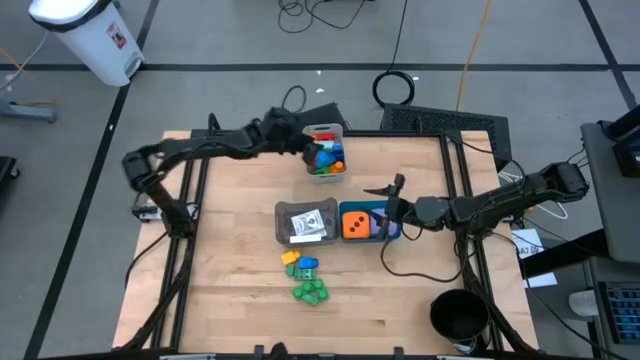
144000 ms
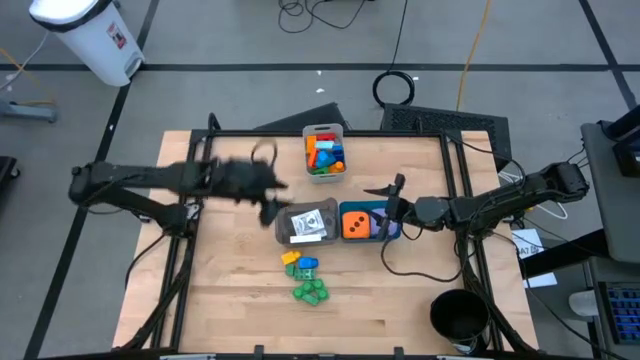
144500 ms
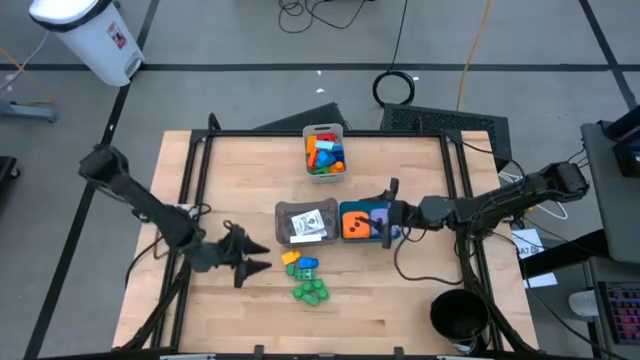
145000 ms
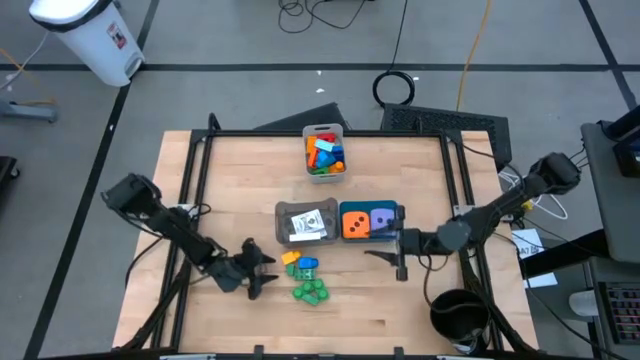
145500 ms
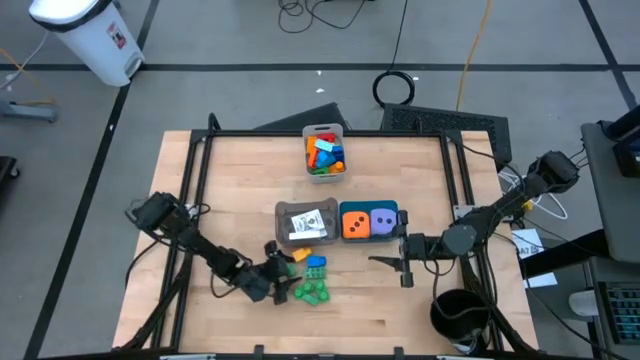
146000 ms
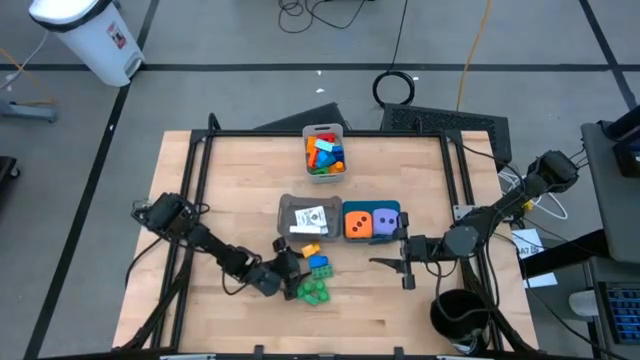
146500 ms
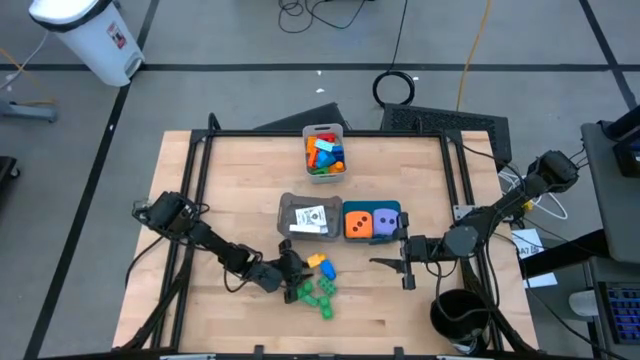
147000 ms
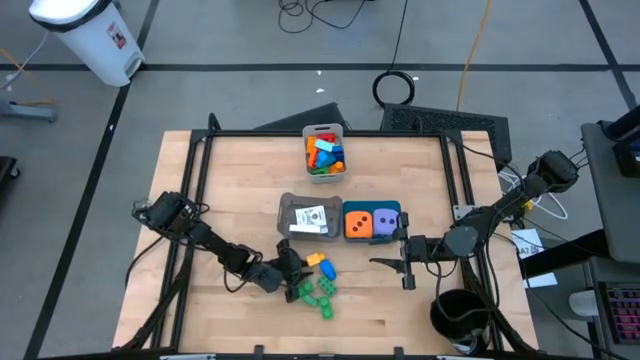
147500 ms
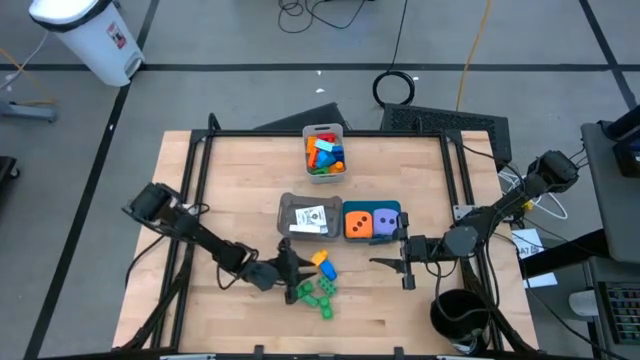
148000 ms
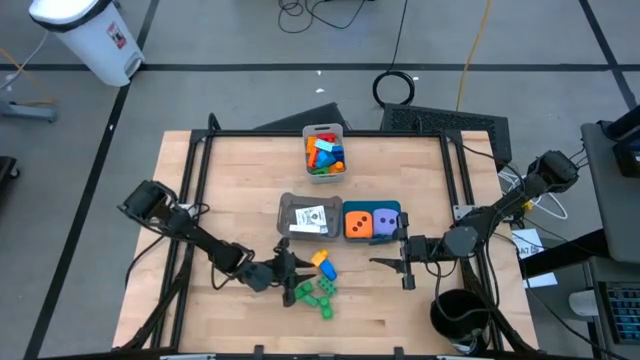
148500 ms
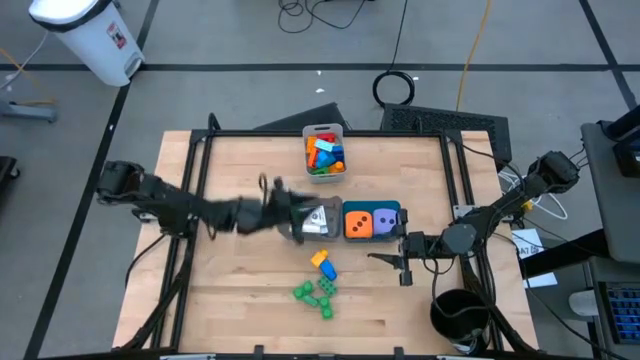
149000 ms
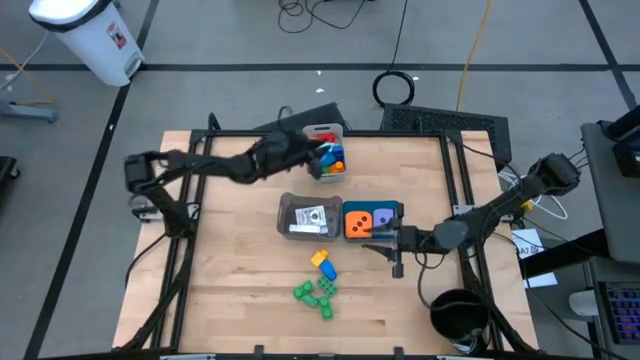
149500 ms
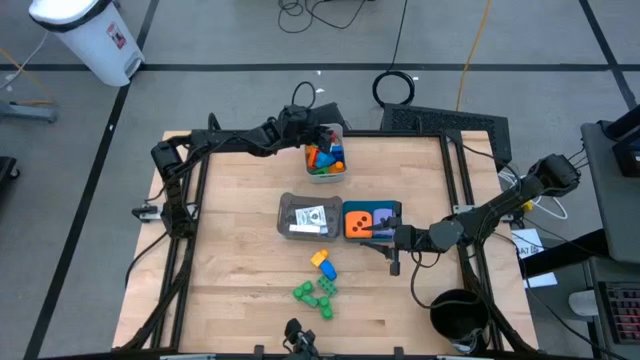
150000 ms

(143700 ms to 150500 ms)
Task: Pick & Place Toys
Put the green game piece into the gray bin

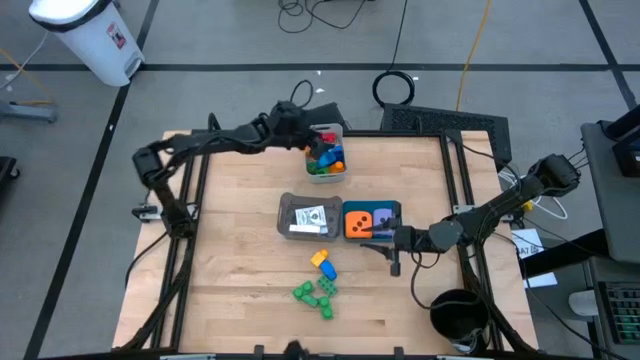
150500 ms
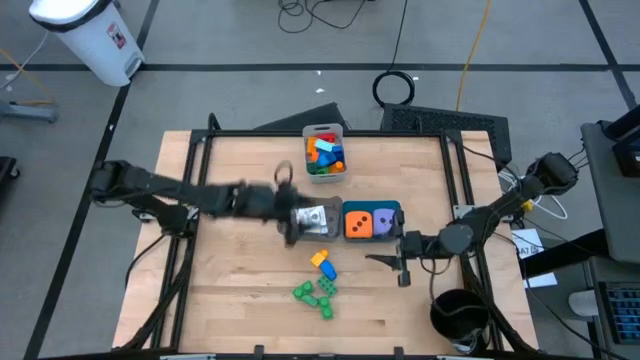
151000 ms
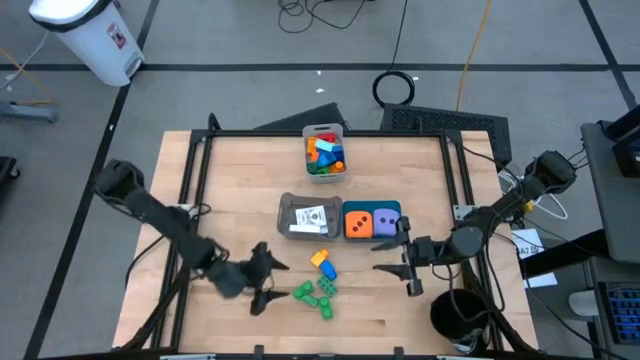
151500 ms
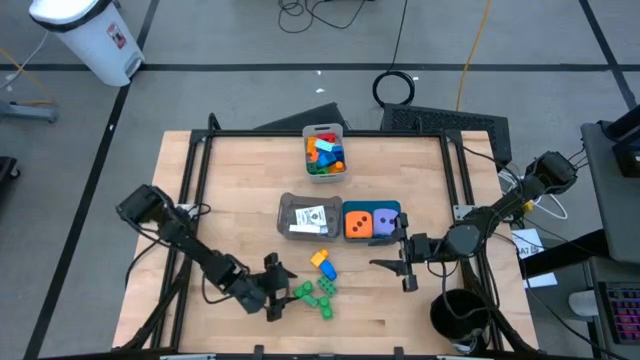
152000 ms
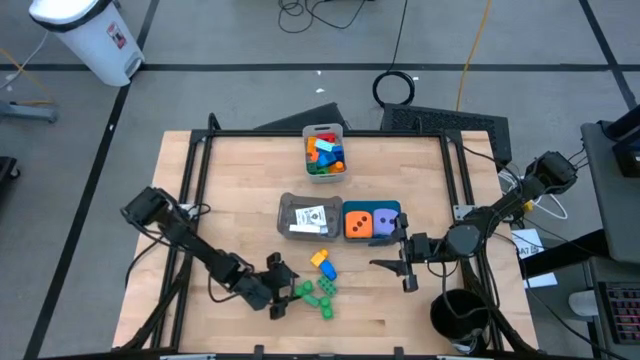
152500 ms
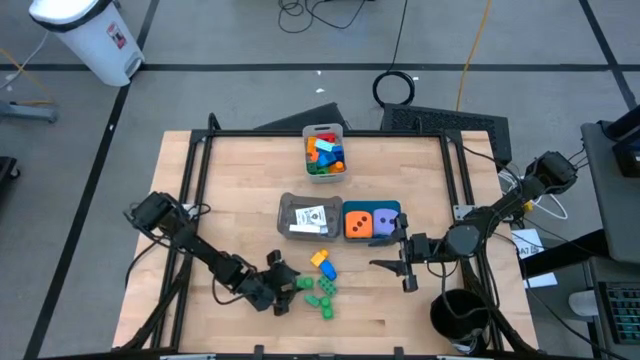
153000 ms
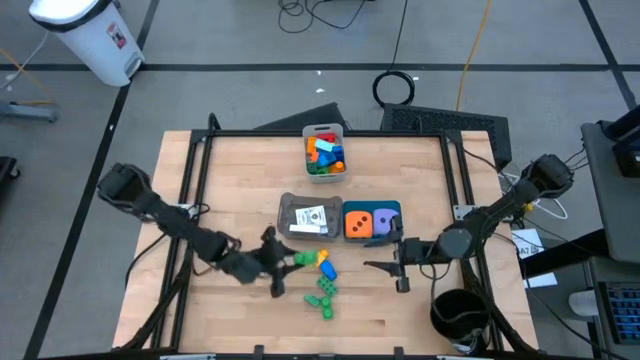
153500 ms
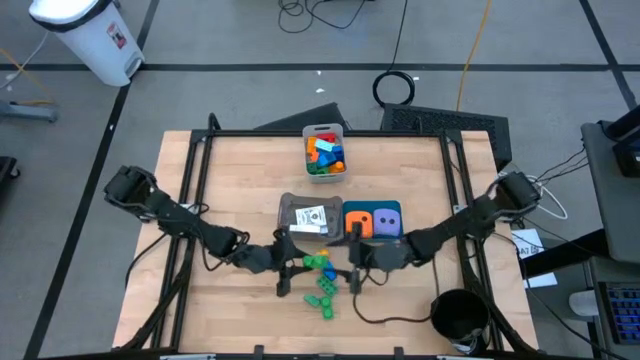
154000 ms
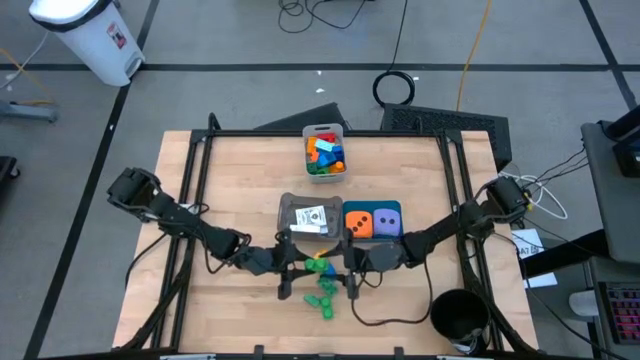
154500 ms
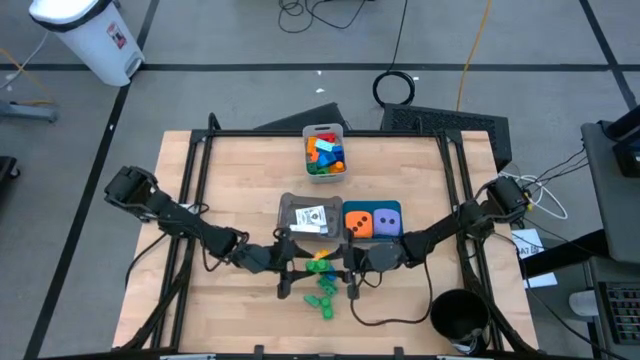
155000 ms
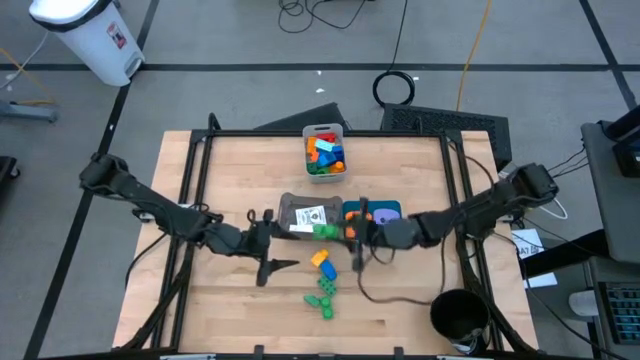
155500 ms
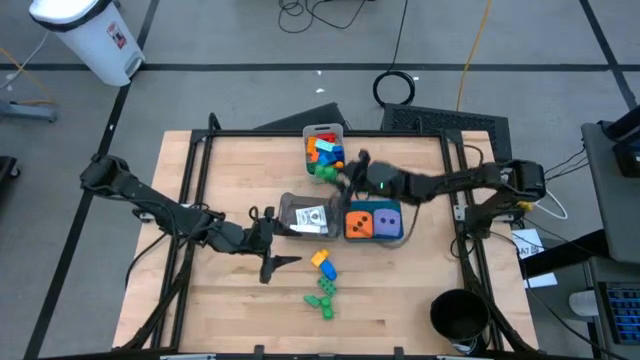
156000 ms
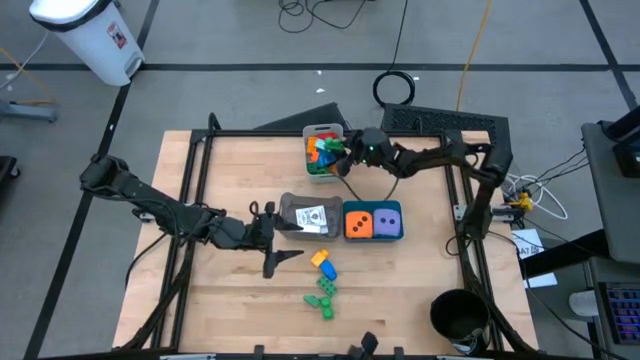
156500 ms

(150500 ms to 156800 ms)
Put the green game piece into the gray bin

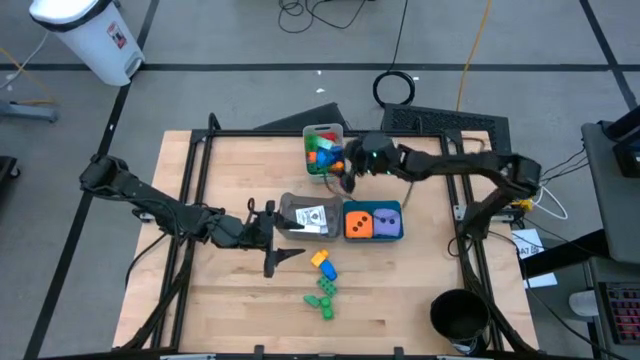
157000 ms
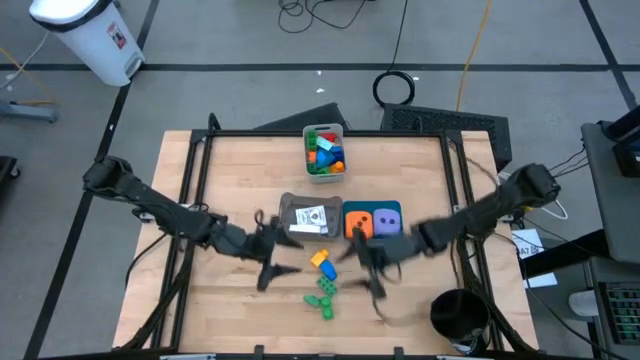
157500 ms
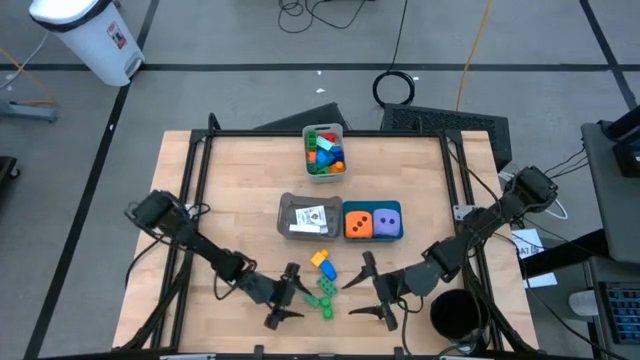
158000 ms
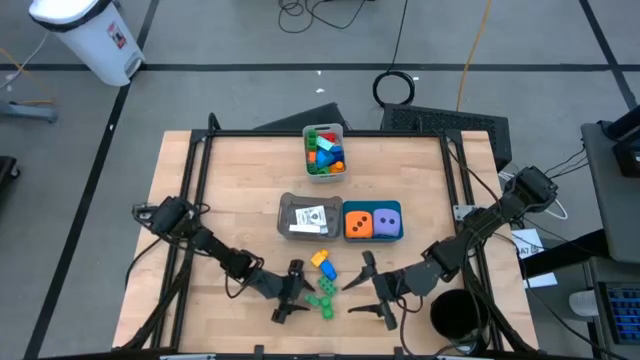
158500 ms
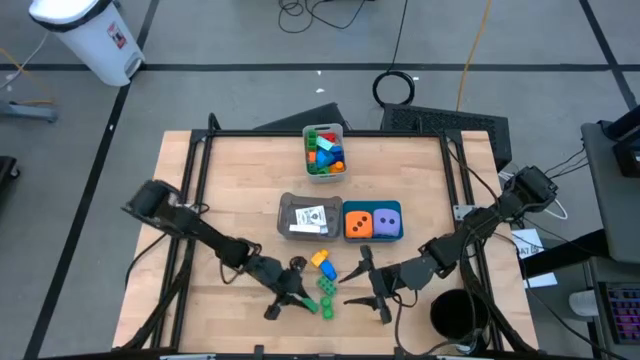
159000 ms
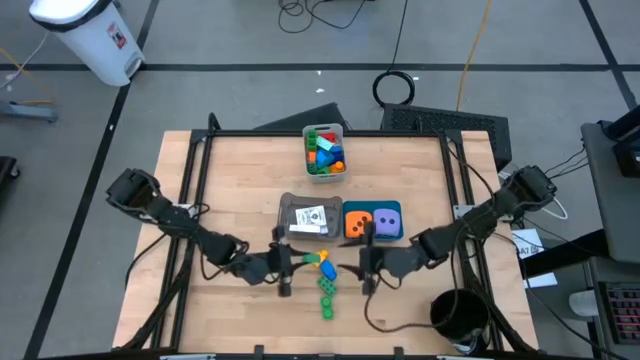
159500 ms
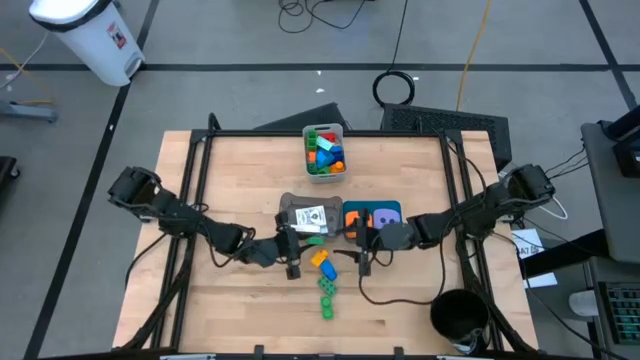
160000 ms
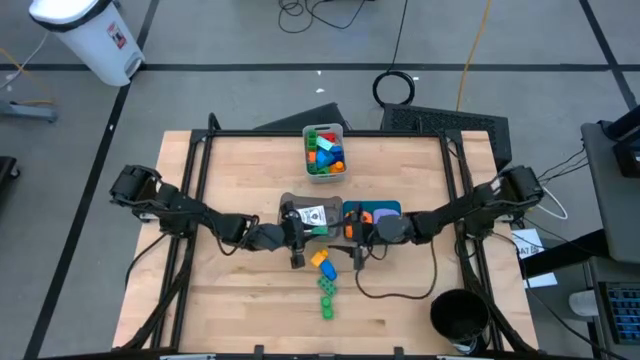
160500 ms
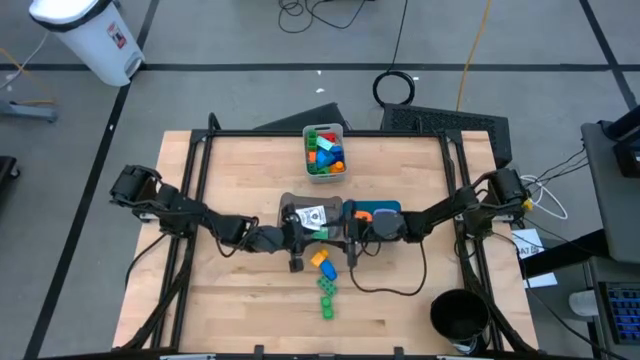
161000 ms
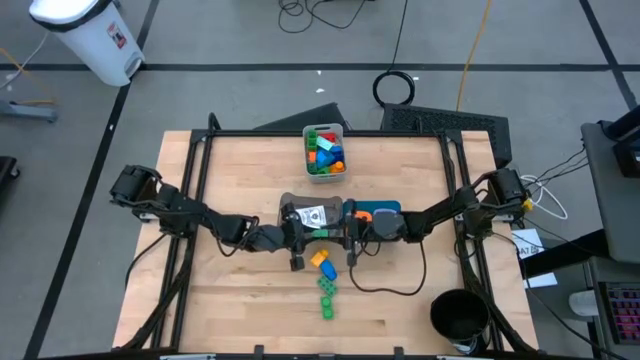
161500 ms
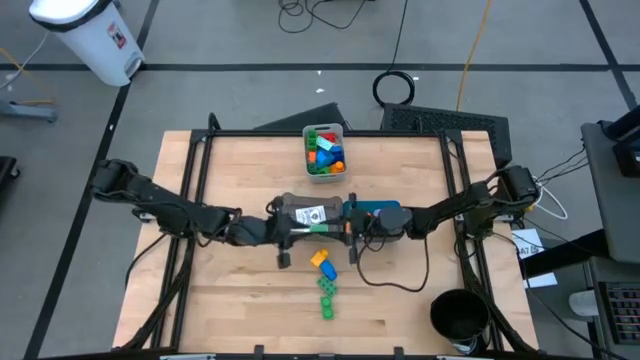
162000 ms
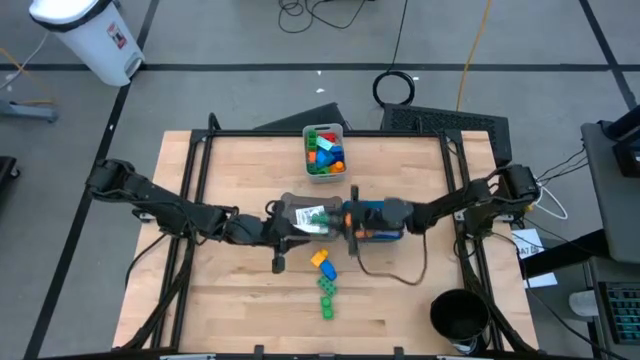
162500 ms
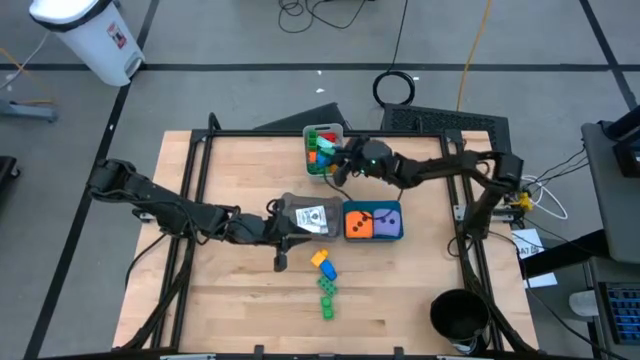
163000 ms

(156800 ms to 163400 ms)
Put the green piece into the gray bin

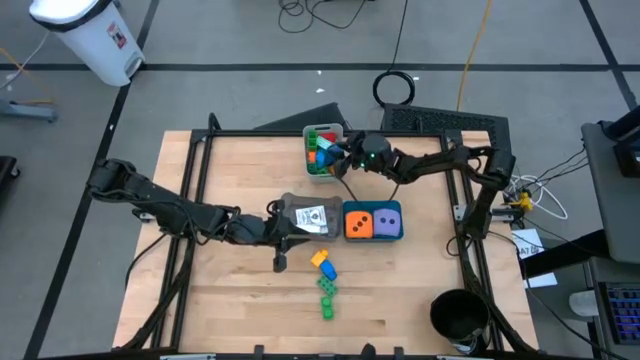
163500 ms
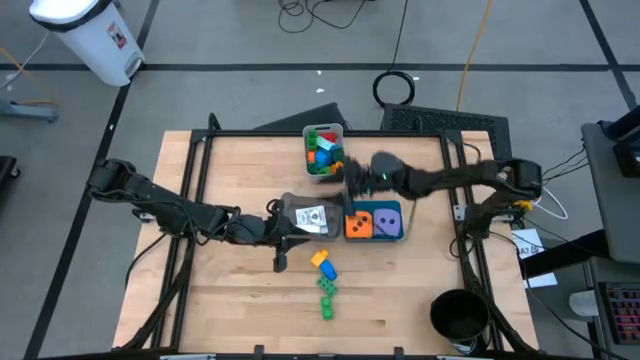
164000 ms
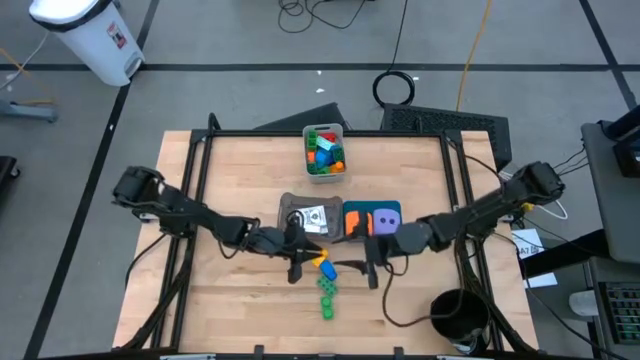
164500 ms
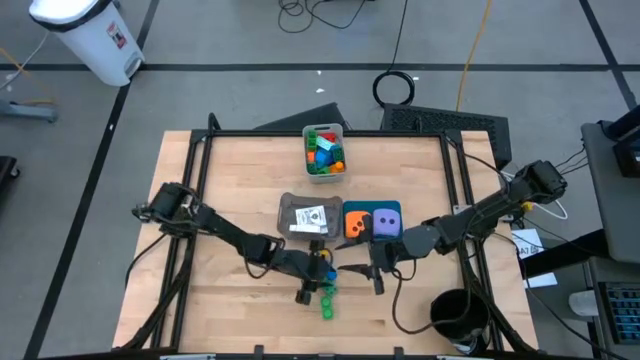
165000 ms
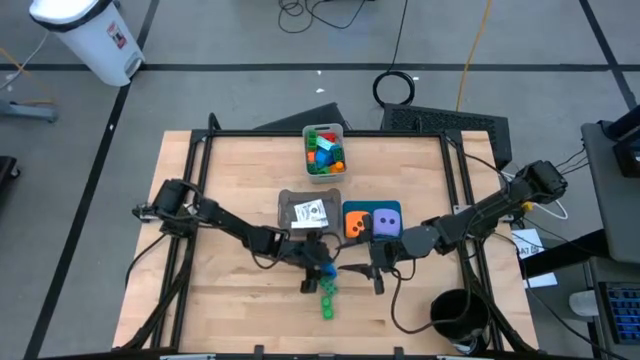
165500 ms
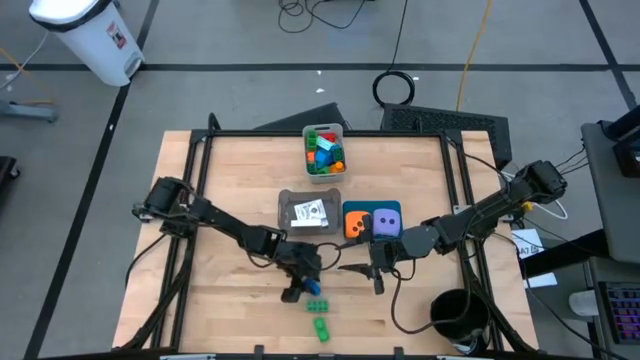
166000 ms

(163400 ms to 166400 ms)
Put the blue game piece into the gray bin
